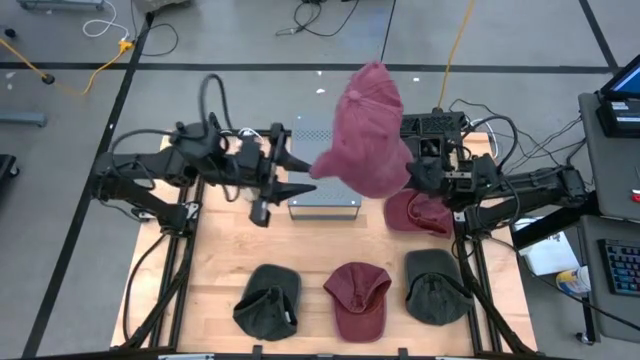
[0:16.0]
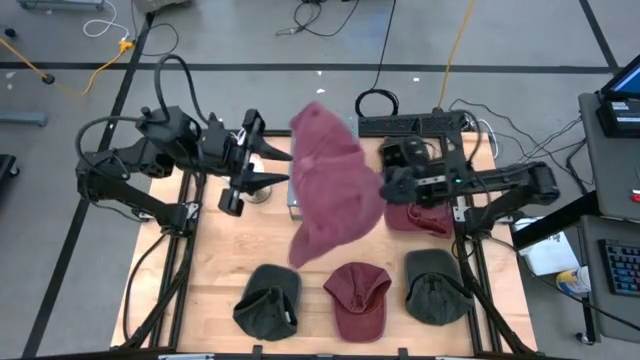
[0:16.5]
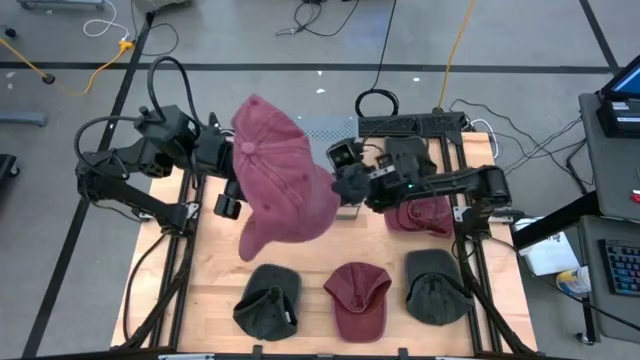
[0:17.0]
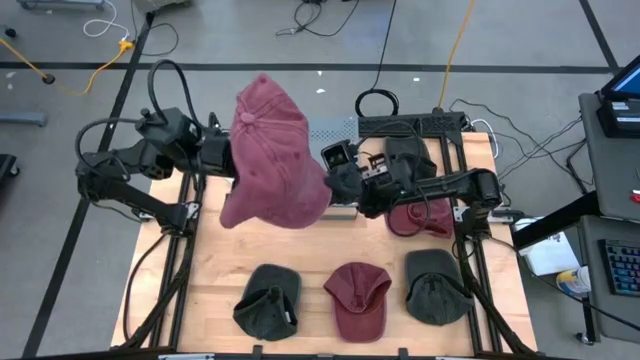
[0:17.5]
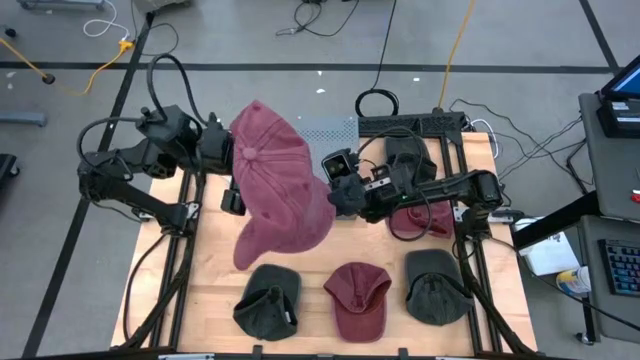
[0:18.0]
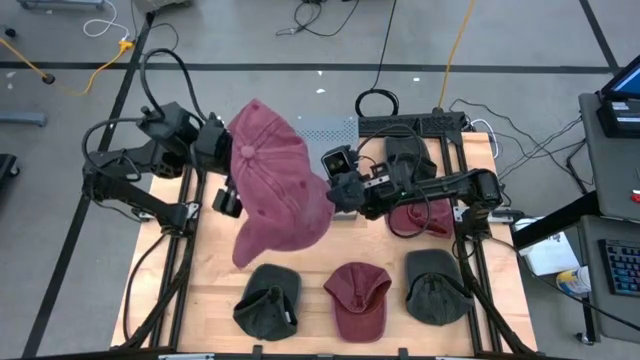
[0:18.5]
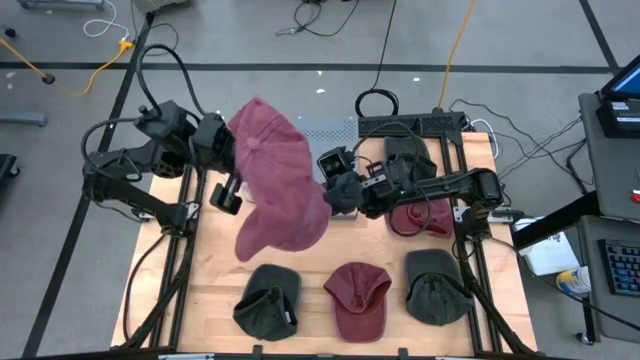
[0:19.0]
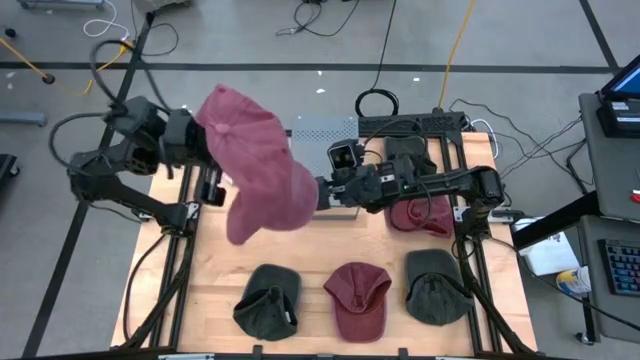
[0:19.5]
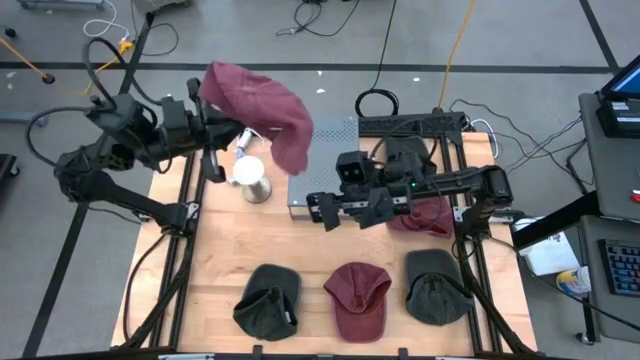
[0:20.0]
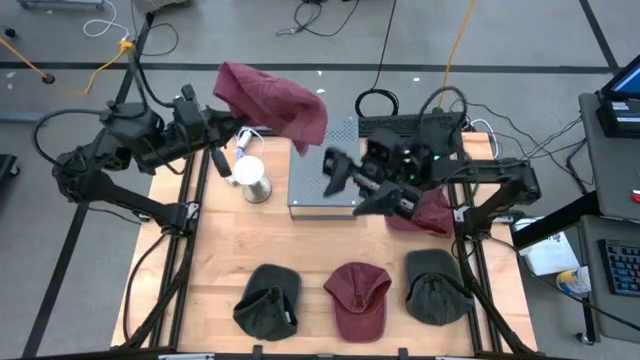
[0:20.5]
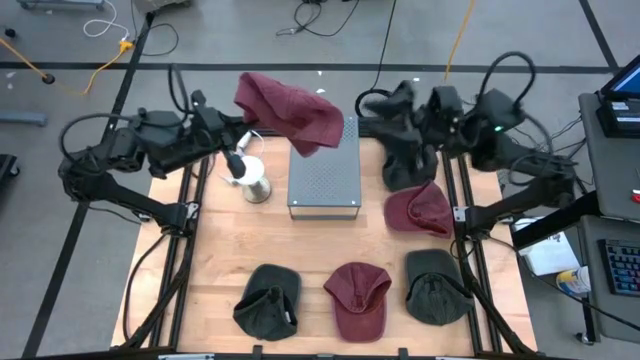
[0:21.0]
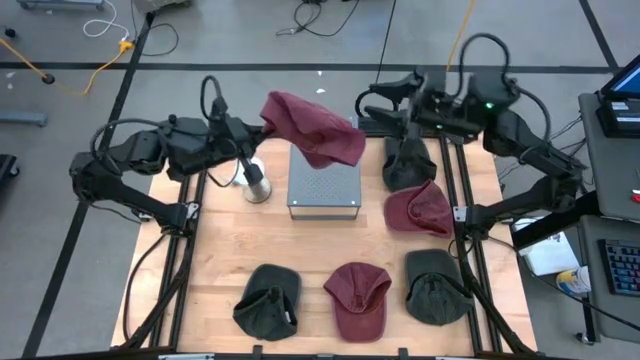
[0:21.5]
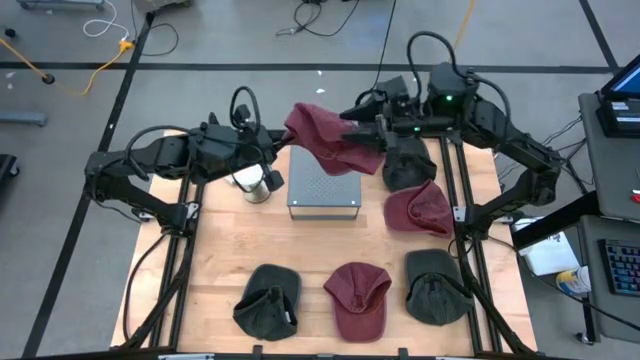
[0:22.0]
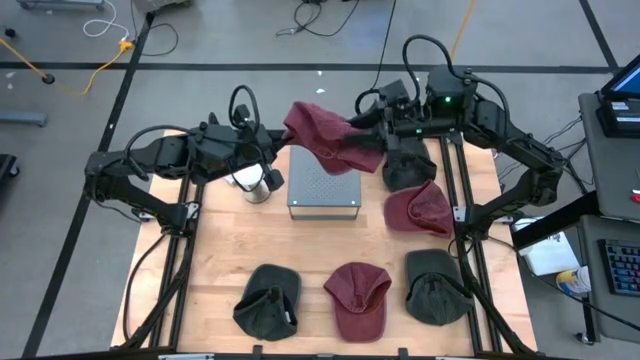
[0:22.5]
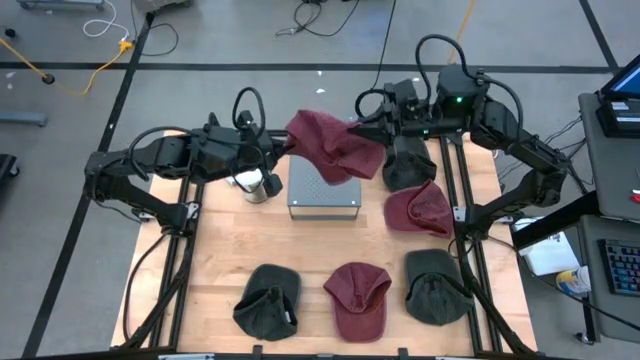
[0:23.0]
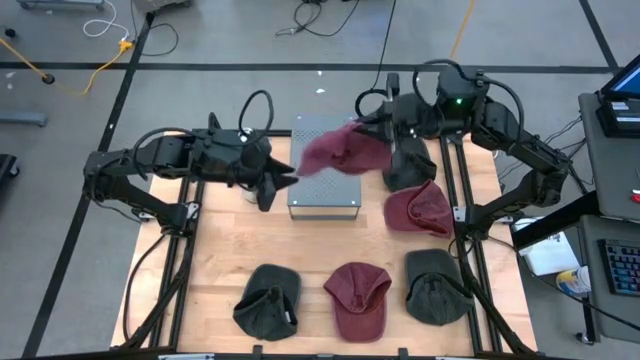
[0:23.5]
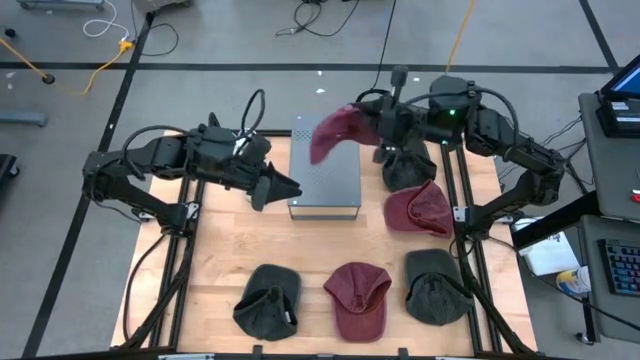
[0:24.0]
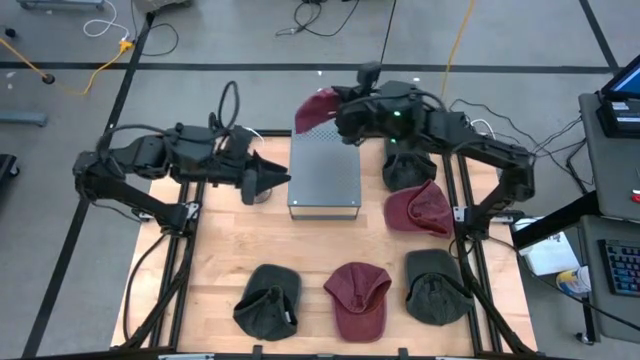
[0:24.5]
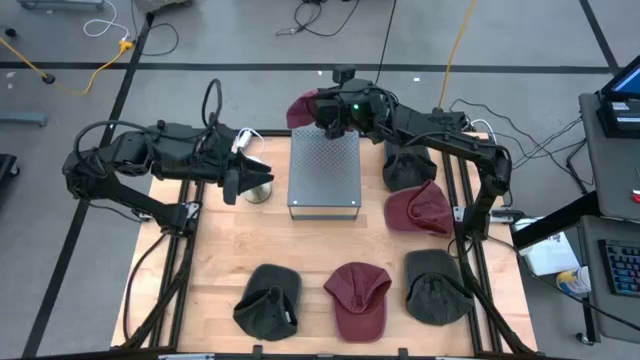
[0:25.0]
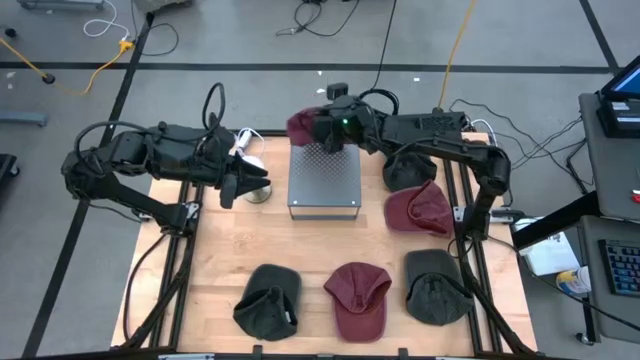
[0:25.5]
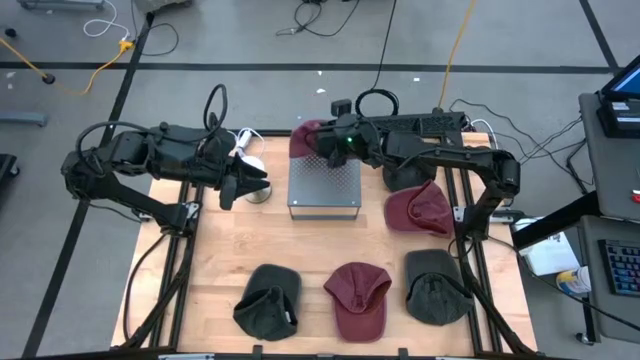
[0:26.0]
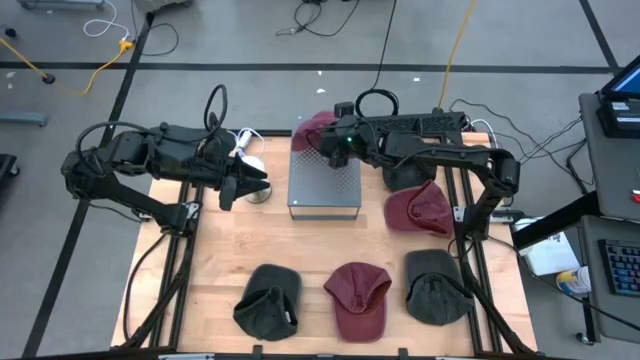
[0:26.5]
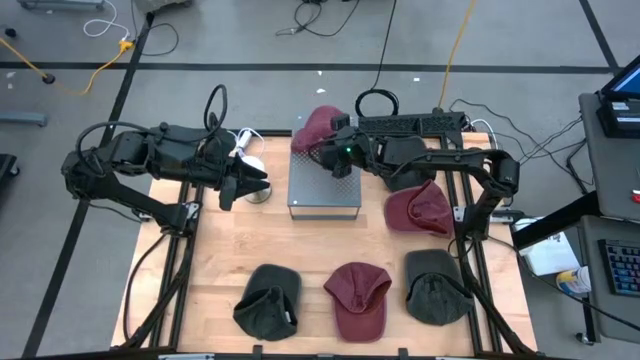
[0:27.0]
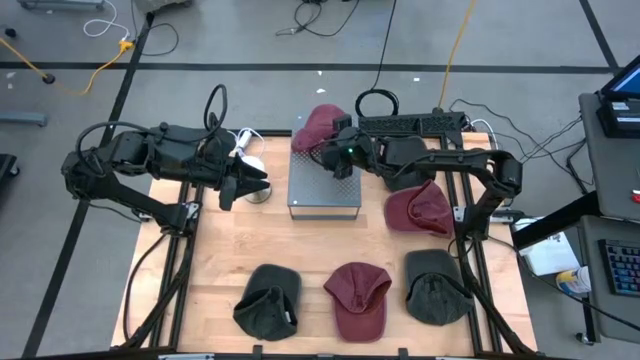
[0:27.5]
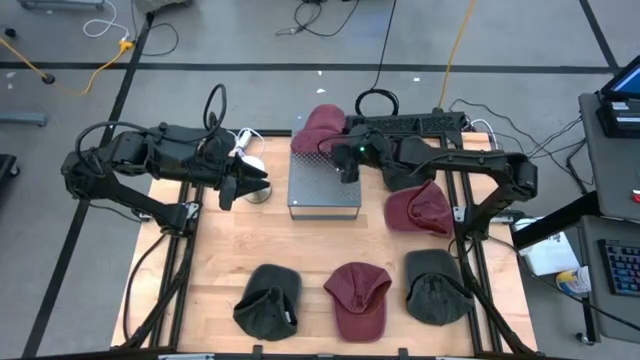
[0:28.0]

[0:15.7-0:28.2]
Task: Pick & Place hat
Put the left red cap on the shelf

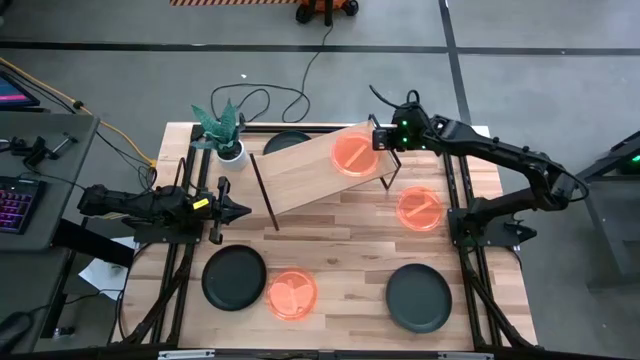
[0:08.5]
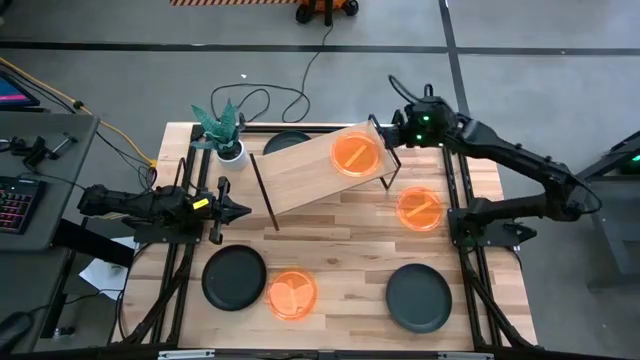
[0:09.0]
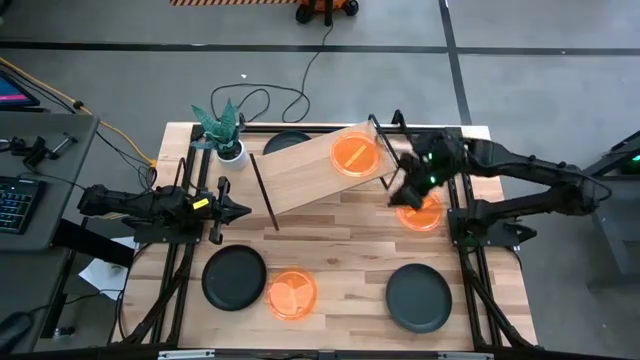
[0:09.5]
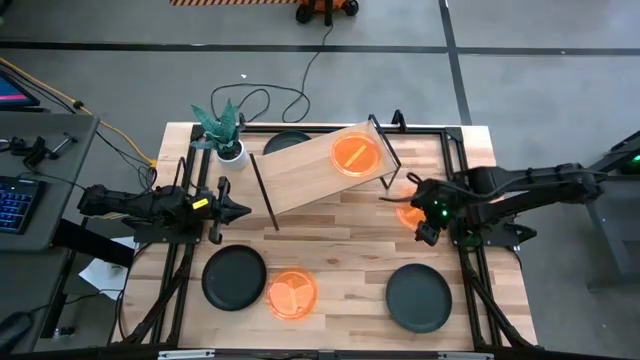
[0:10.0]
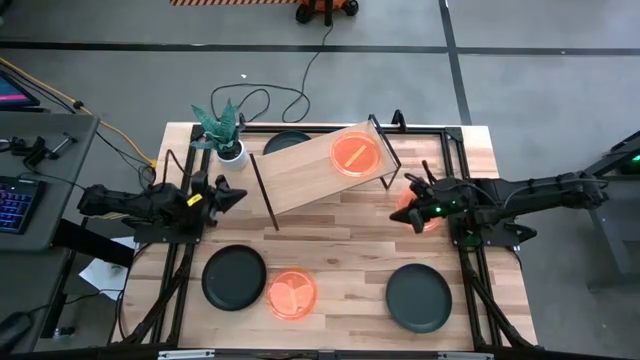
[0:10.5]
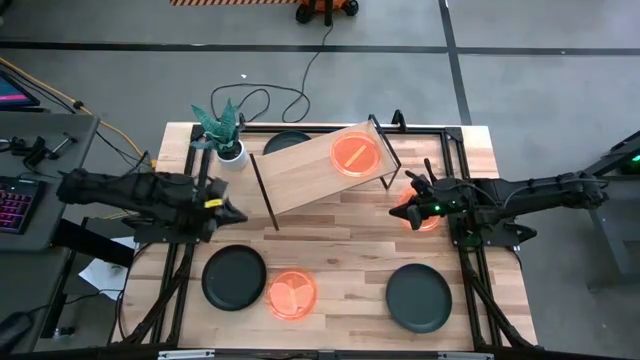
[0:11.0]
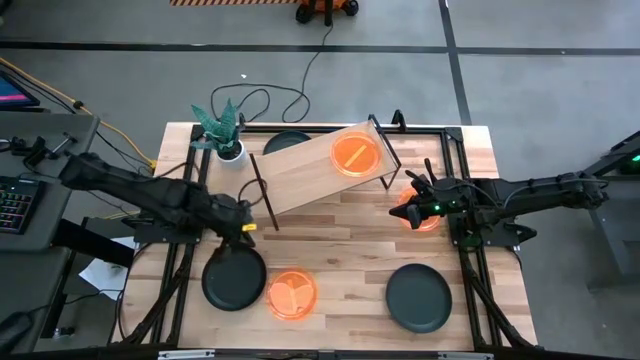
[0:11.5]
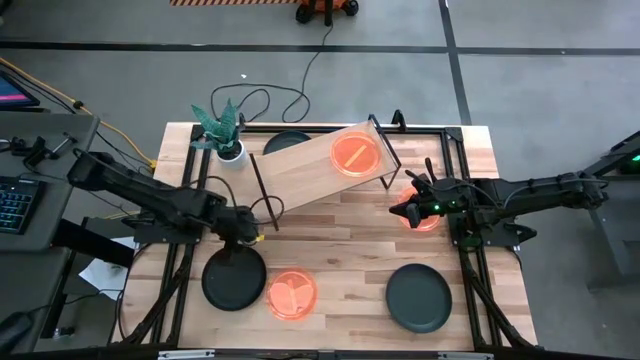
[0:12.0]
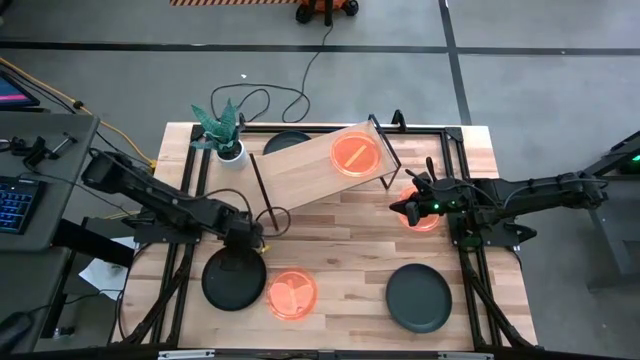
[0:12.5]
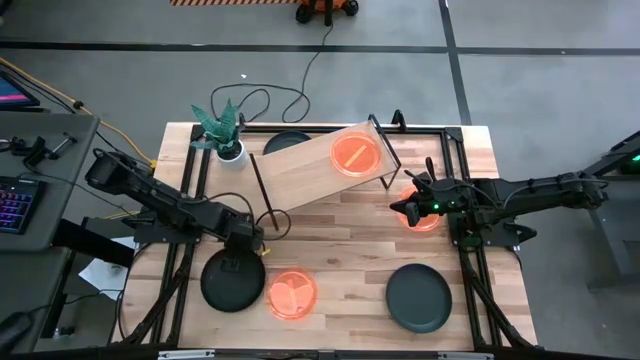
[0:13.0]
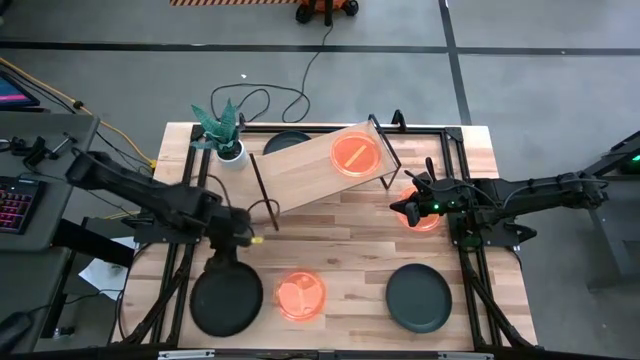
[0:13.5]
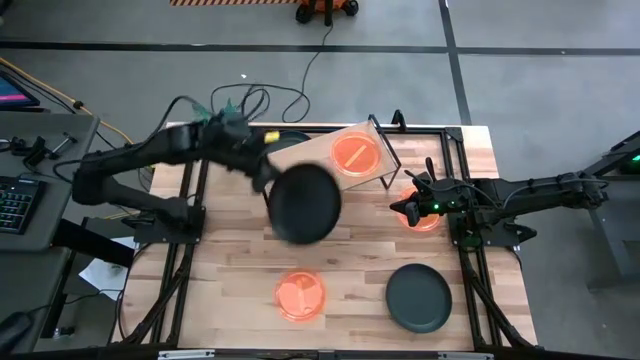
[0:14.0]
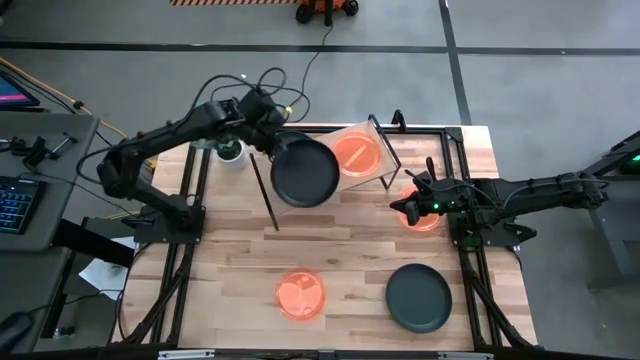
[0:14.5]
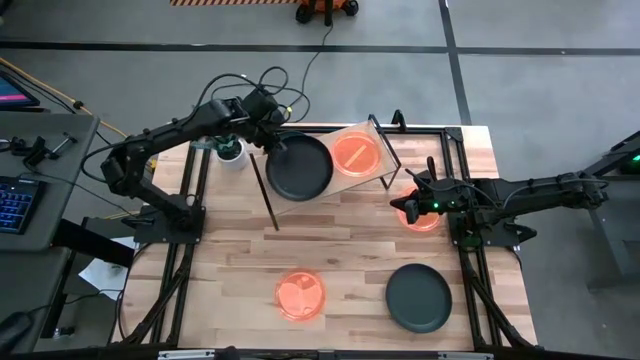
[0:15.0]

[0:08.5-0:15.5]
Task: Place and stack plates onto a shelf
Put the bottom left black plate on the shelf

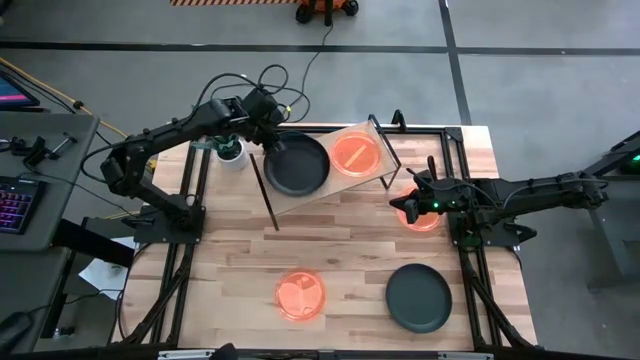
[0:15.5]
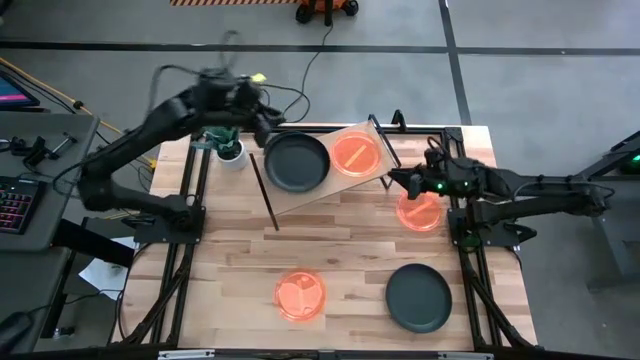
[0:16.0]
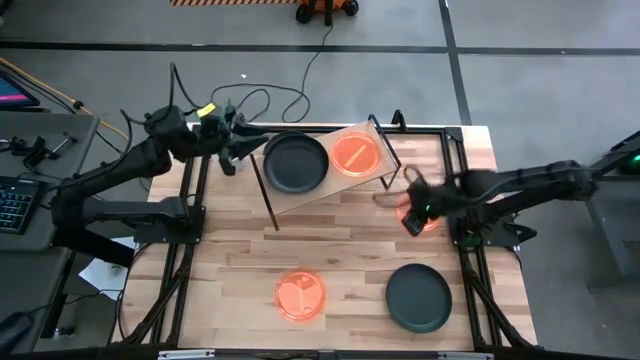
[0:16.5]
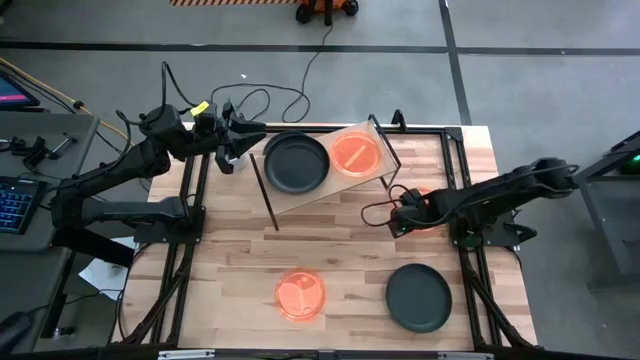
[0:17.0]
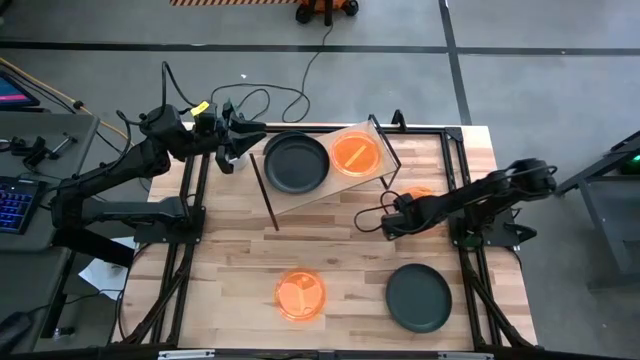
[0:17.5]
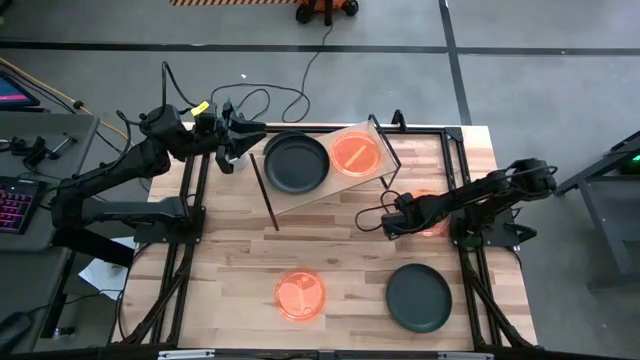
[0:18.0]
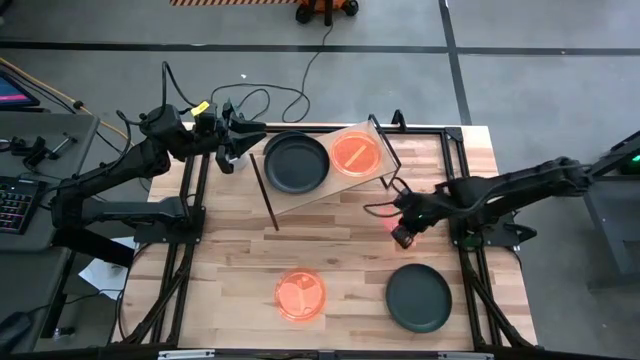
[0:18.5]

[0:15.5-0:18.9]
Stack the right orange plate on top of the orange plate on the shelf
